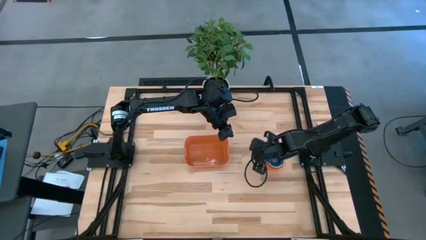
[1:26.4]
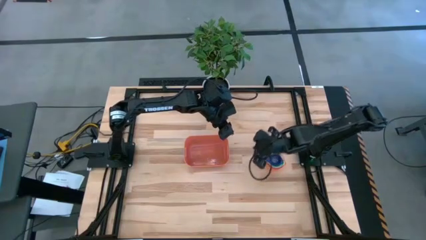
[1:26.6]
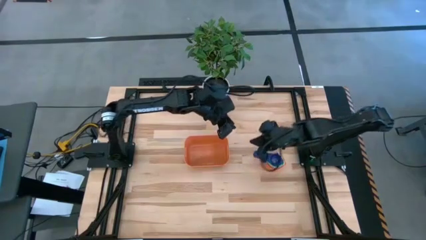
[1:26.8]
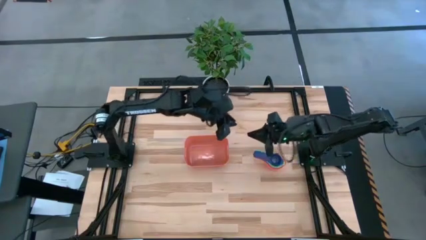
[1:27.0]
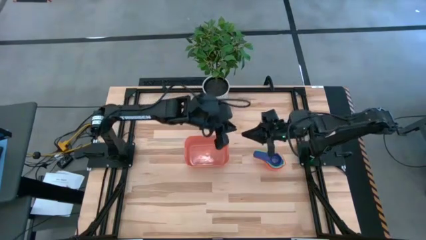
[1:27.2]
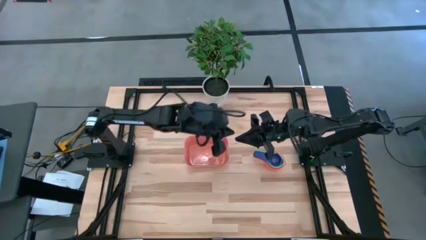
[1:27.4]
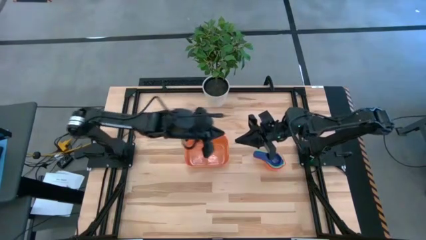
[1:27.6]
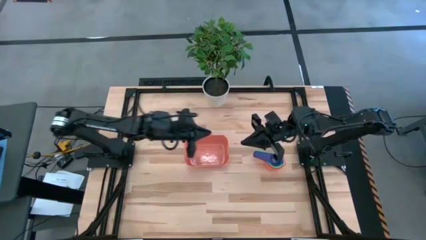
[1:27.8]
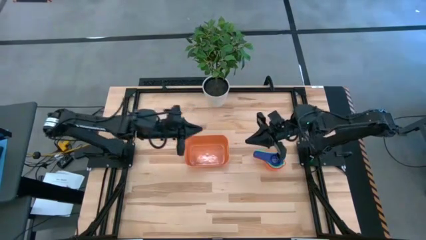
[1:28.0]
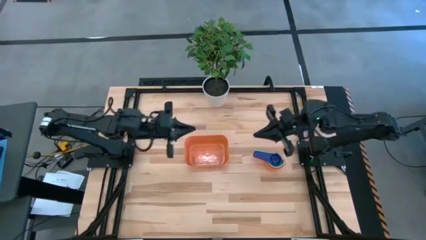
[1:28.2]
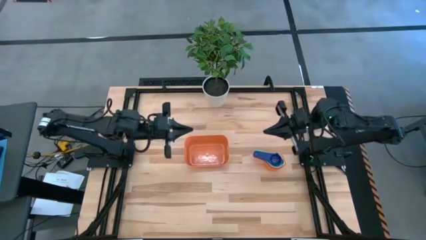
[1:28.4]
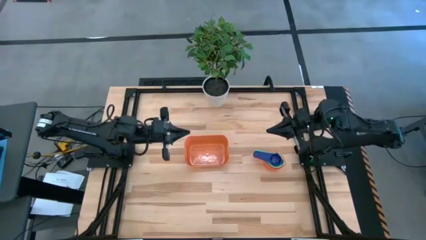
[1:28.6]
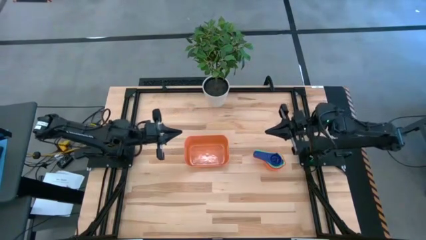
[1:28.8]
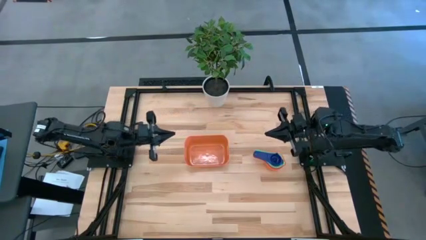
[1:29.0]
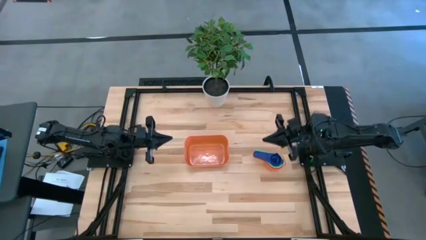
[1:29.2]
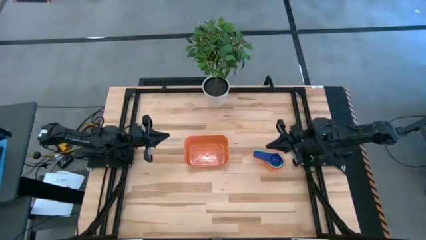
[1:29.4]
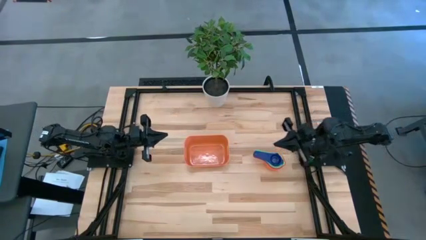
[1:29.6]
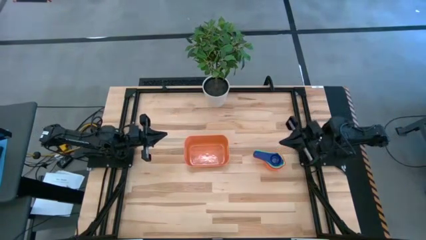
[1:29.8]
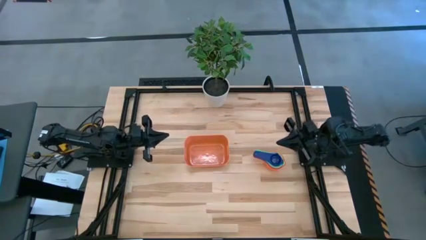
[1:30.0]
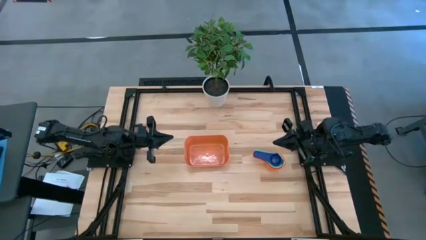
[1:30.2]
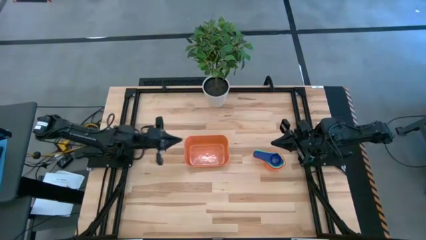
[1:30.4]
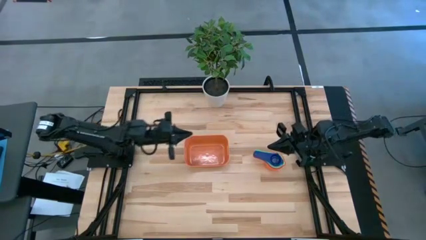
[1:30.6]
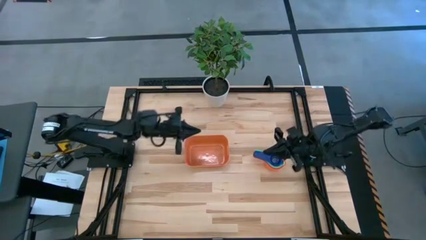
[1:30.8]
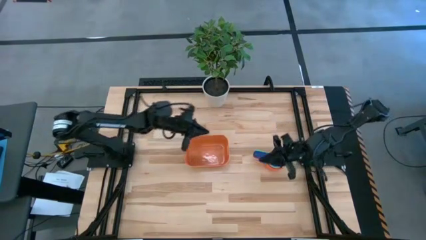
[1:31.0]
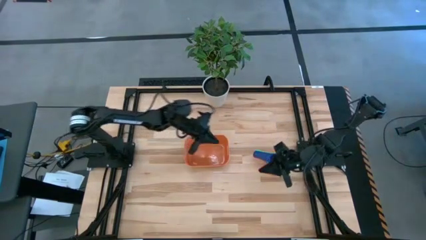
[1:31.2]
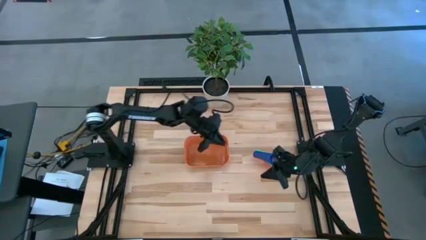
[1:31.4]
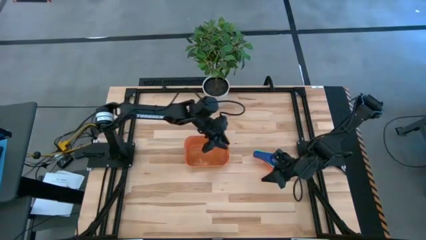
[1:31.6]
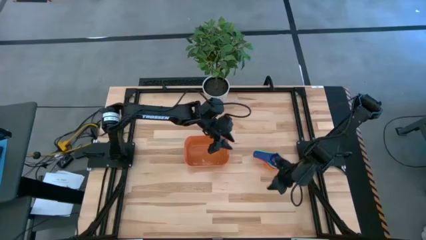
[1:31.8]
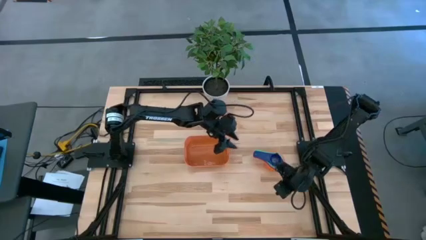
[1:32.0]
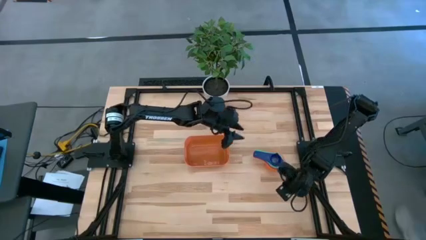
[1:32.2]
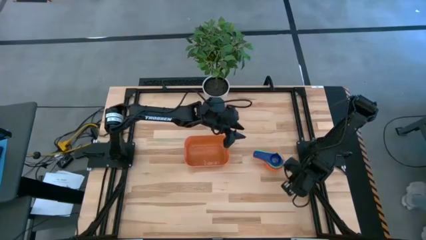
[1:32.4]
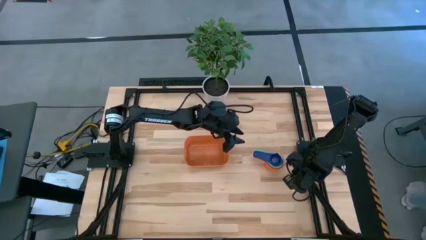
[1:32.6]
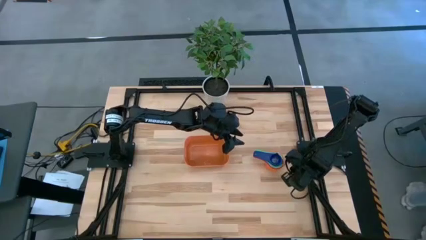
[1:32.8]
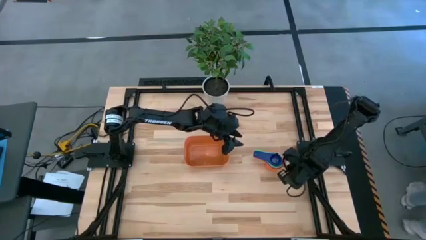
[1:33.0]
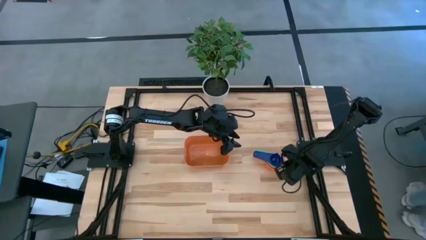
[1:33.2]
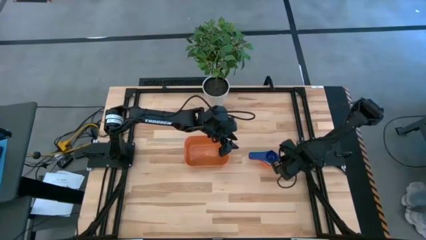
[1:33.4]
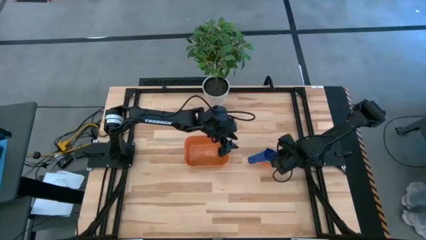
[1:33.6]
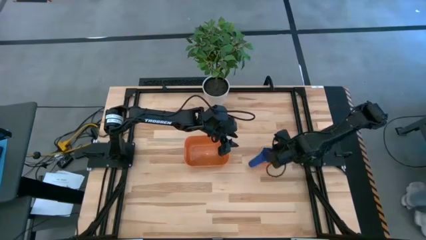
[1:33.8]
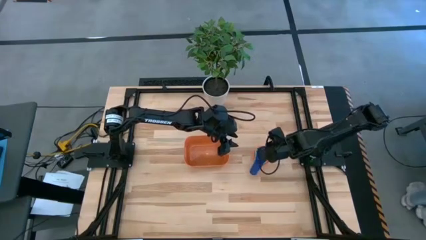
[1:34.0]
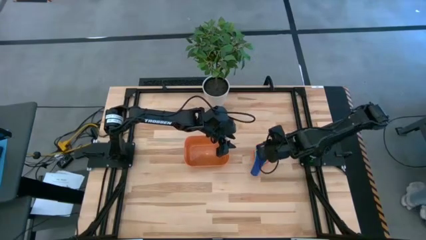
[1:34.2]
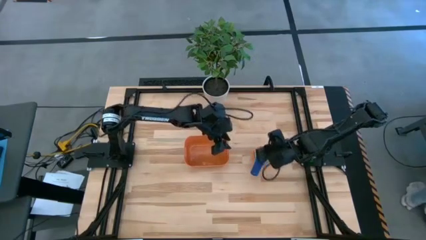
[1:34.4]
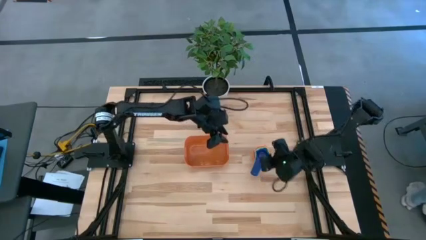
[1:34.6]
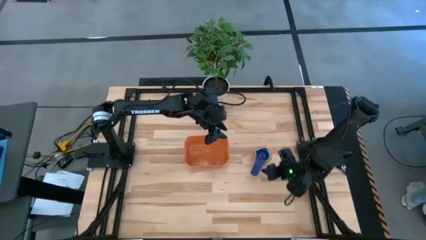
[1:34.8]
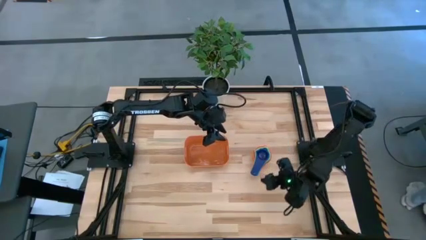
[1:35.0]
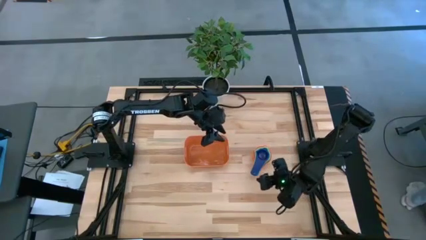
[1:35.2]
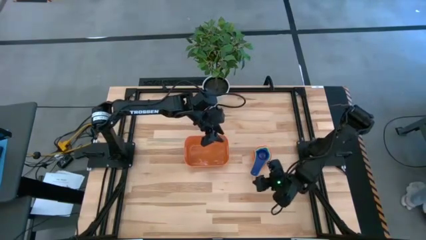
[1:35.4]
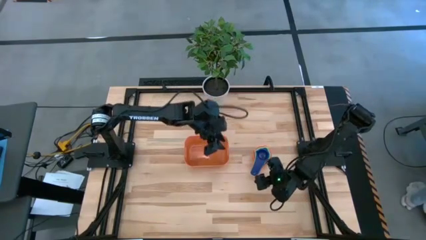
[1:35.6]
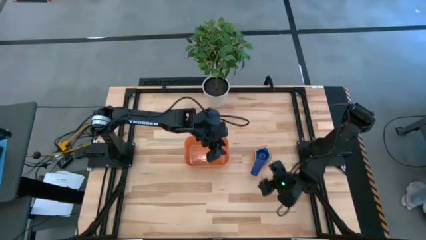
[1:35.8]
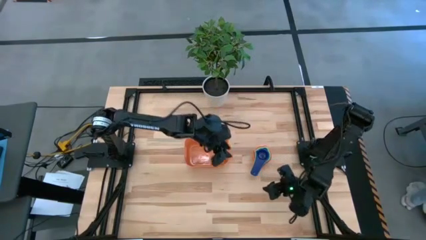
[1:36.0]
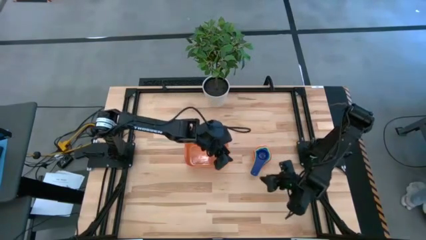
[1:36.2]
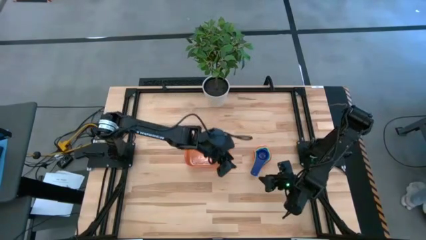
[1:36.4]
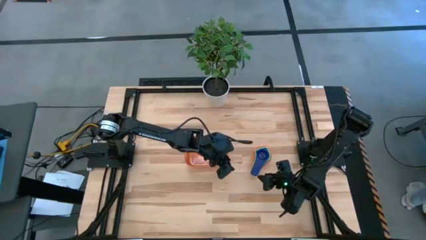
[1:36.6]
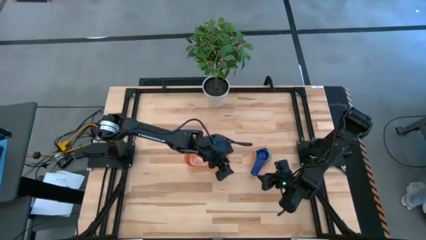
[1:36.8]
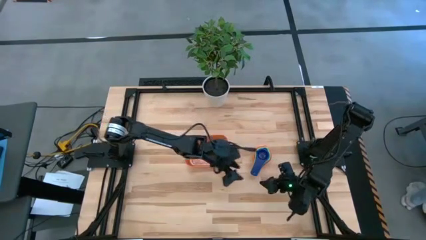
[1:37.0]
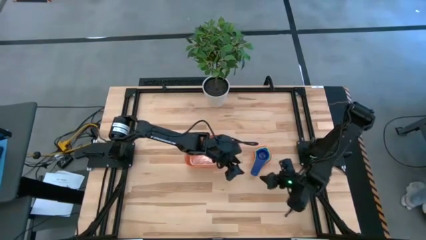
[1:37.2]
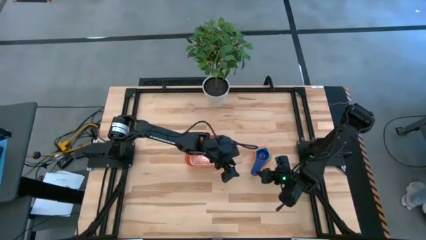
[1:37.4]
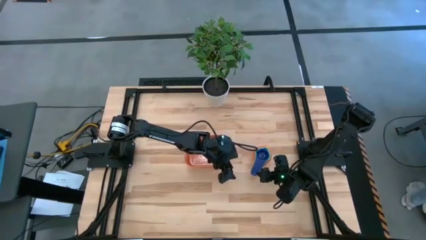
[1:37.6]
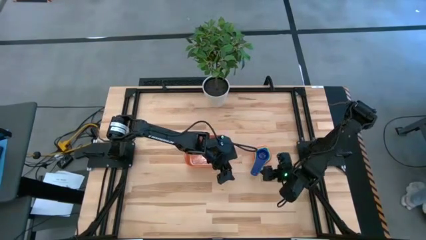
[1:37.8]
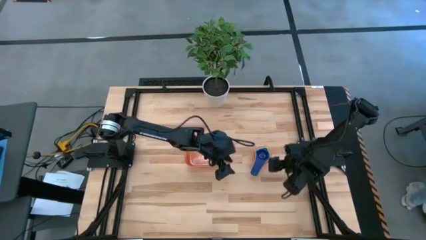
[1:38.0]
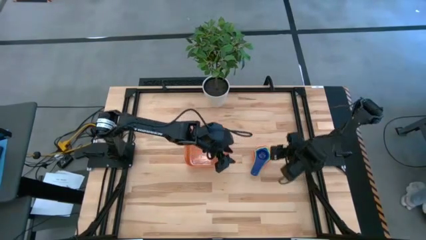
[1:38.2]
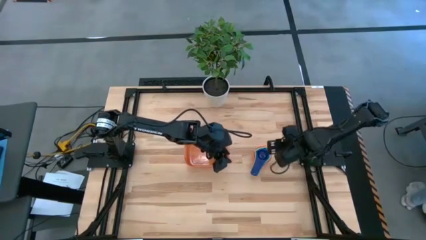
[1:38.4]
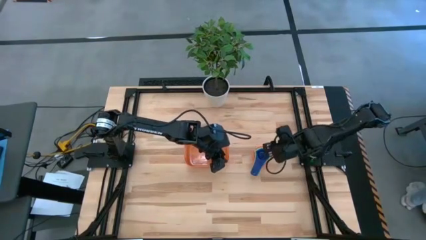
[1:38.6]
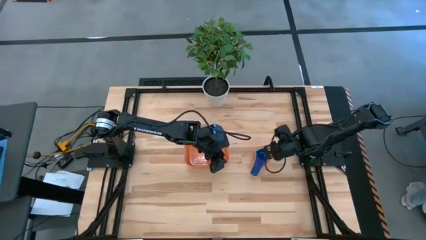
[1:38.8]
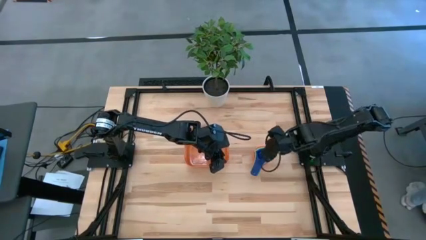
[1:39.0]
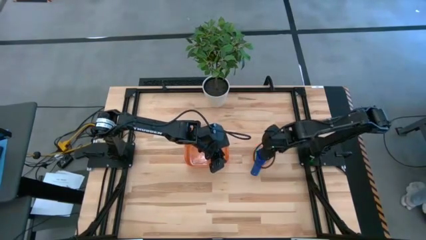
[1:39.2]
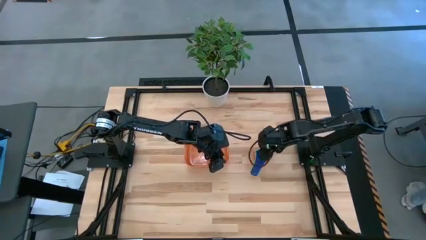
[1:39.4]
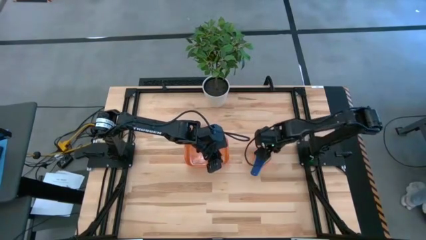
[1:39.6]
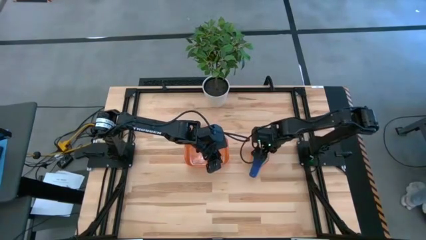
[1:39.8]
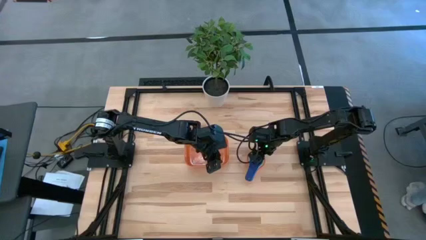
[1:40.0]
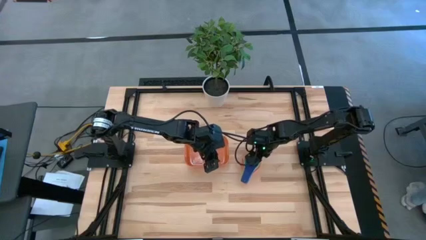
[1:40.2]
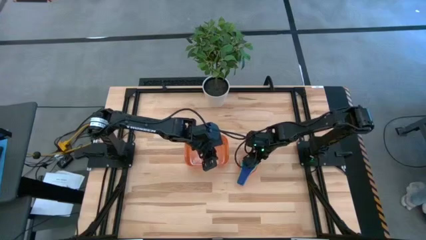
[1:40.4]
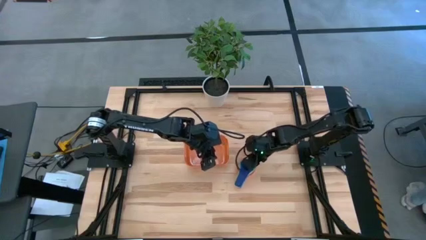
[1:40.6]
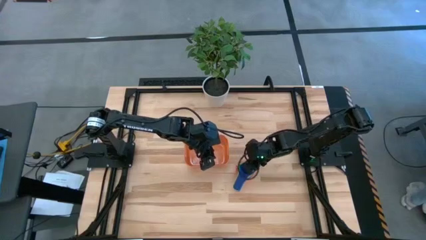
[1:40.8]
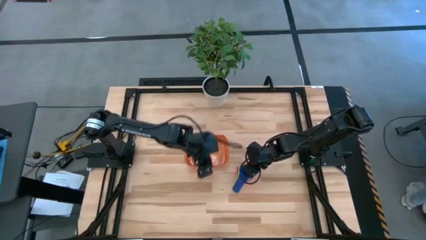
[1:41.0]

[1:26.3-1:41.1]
Task: Nest measuring cups in basket
Put the nested measuring cups into the orange bin
